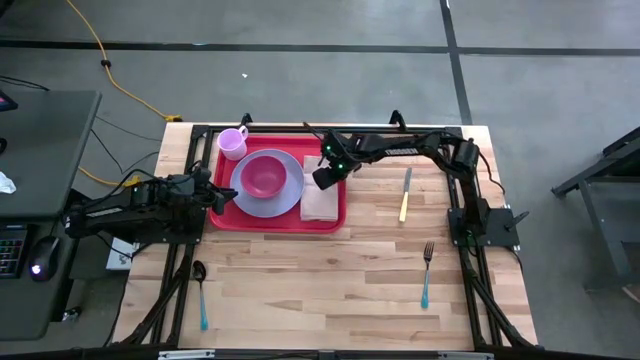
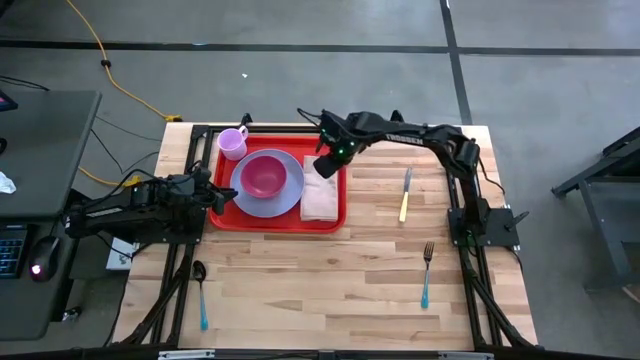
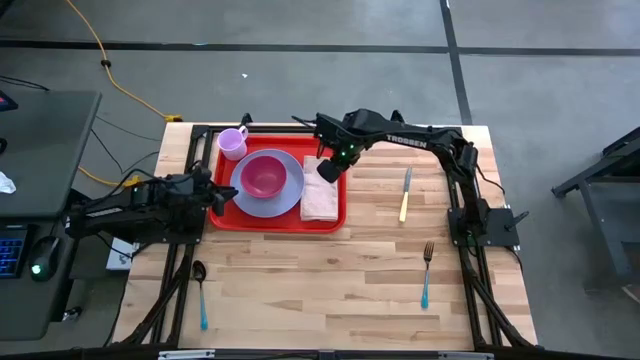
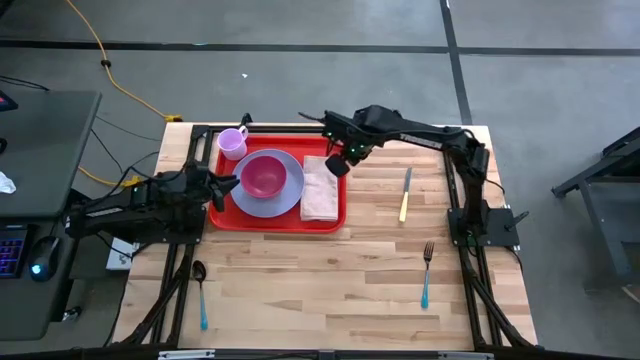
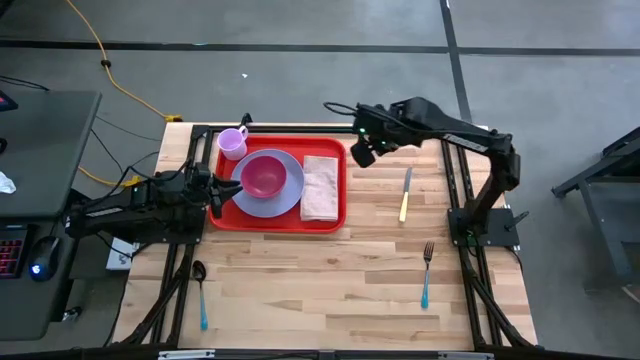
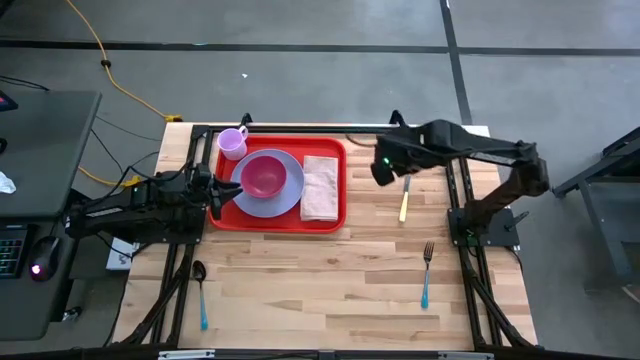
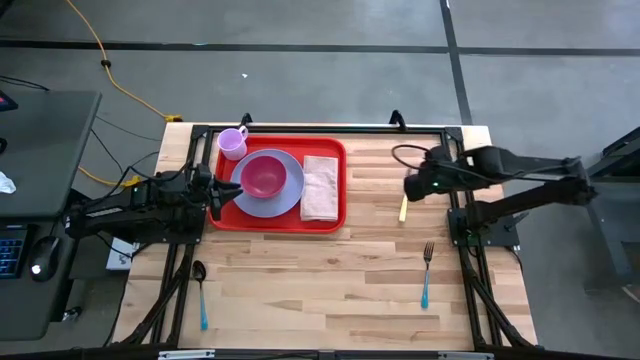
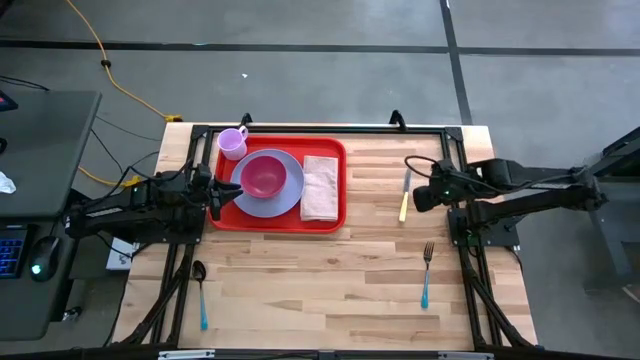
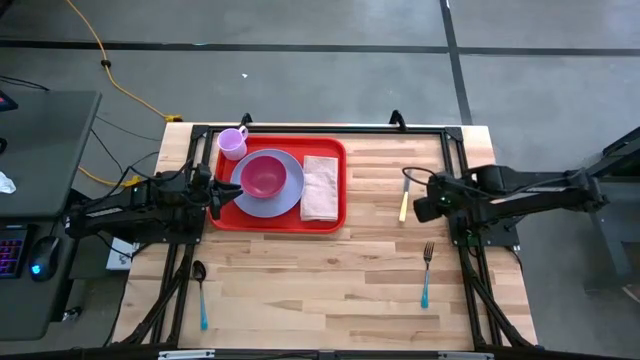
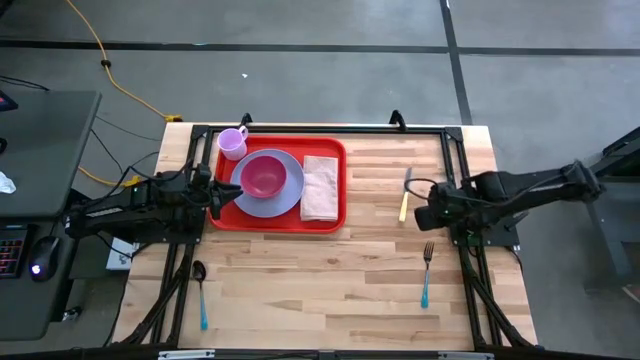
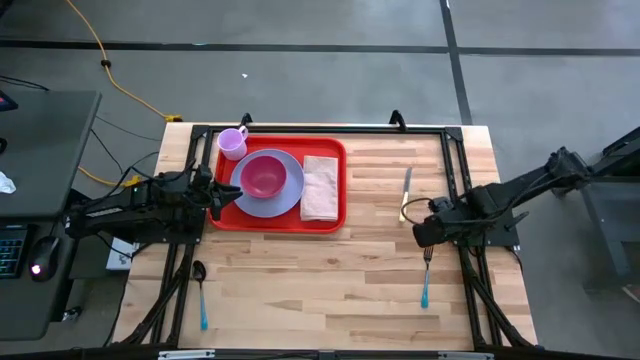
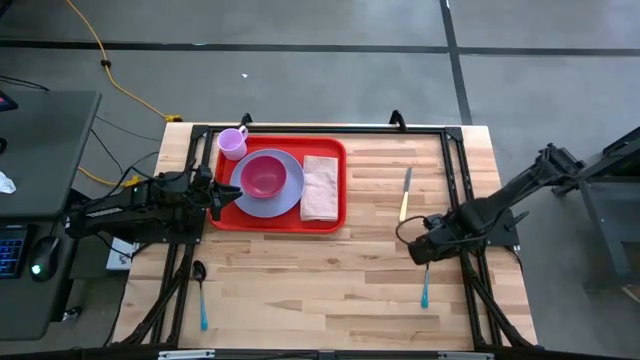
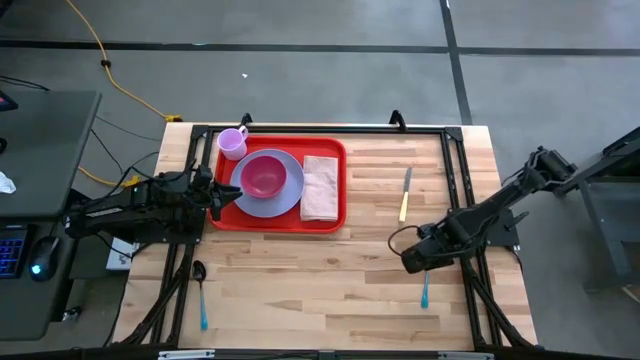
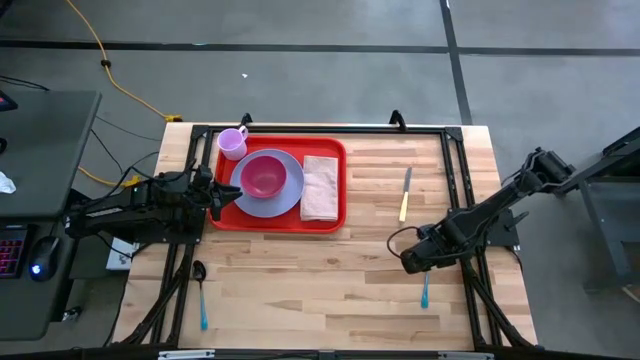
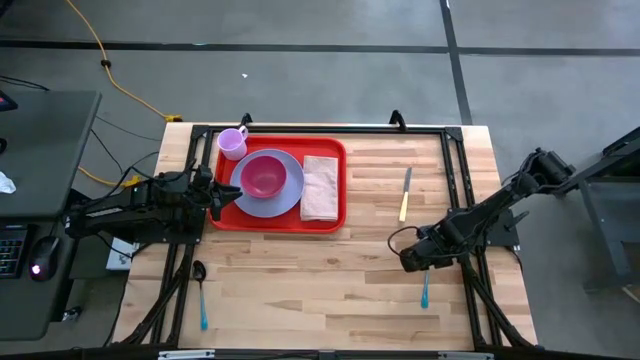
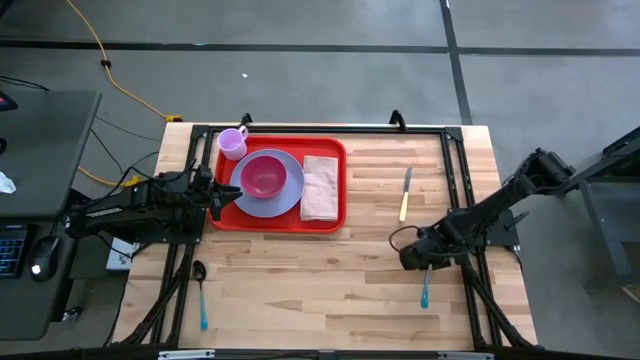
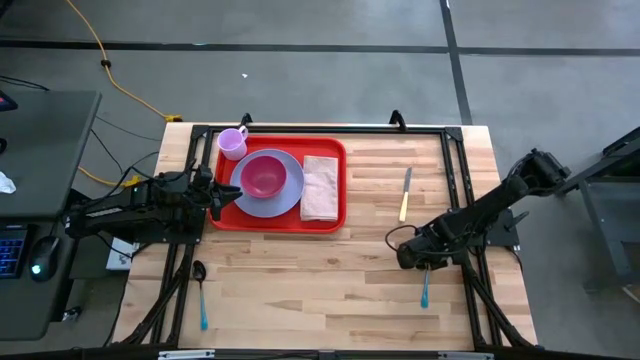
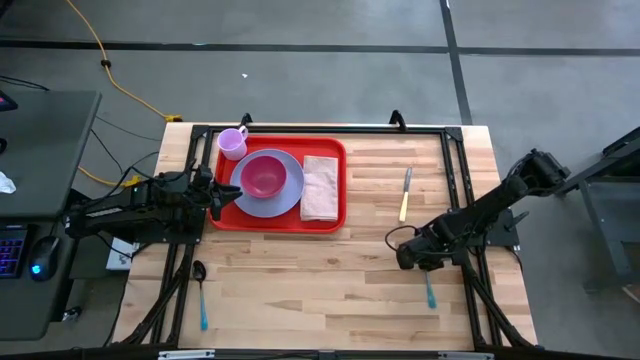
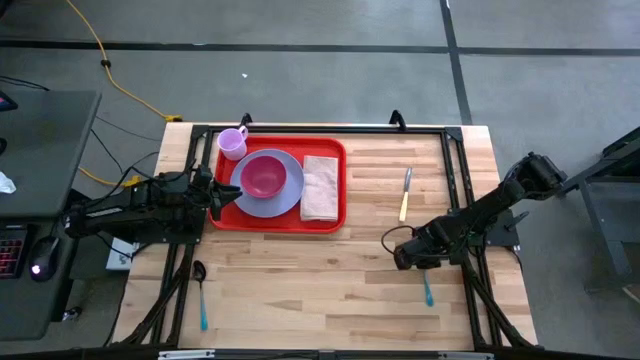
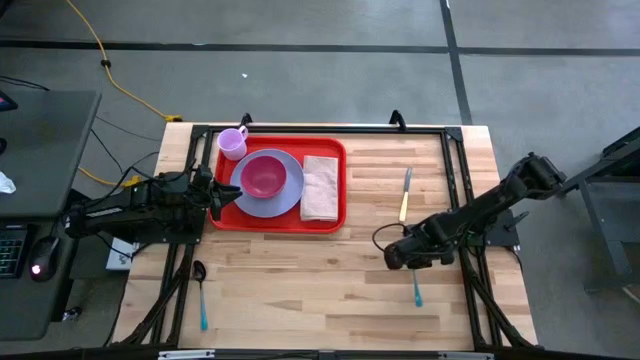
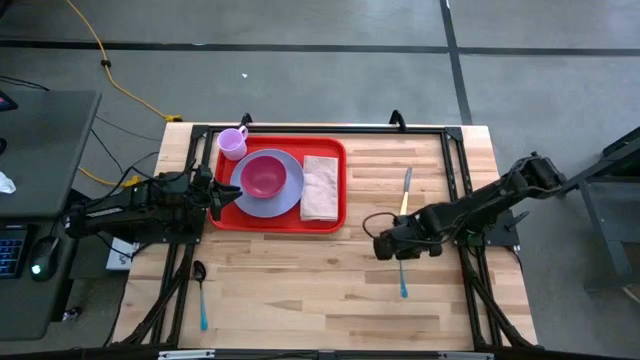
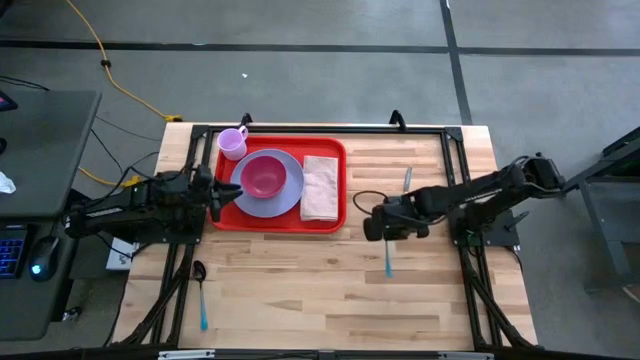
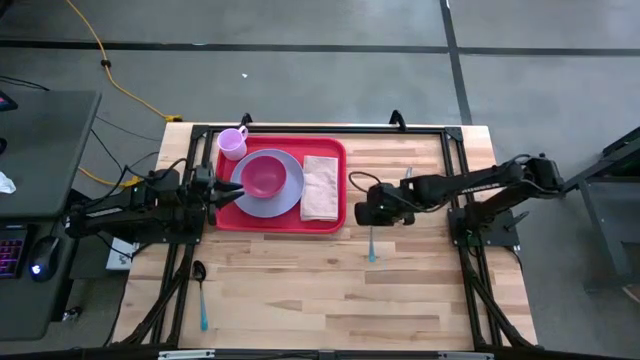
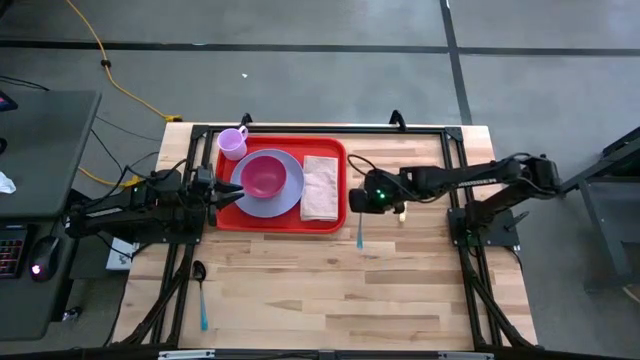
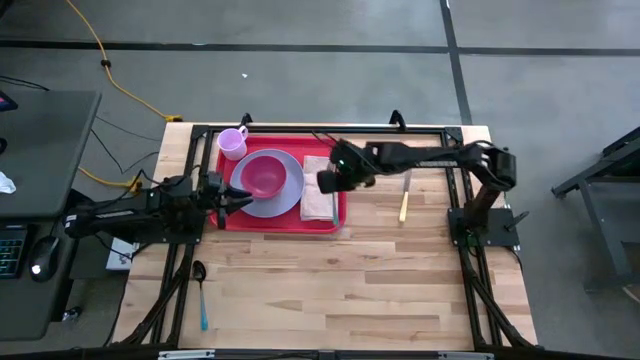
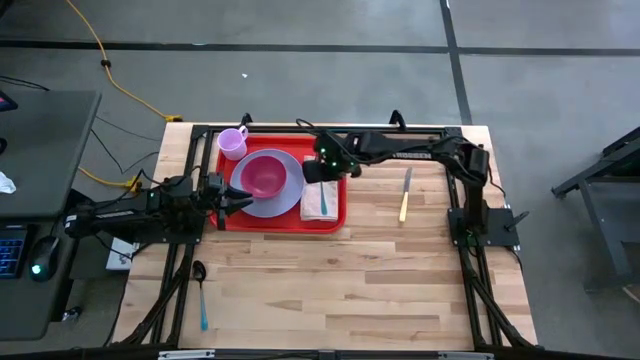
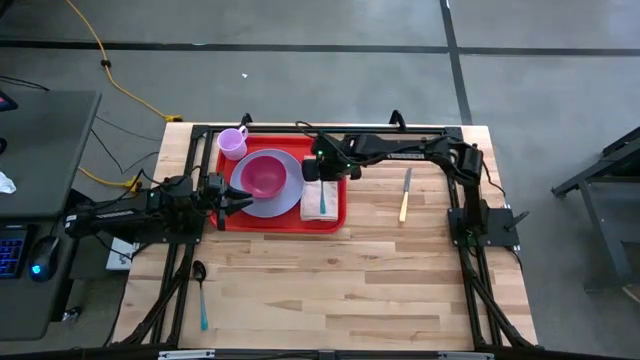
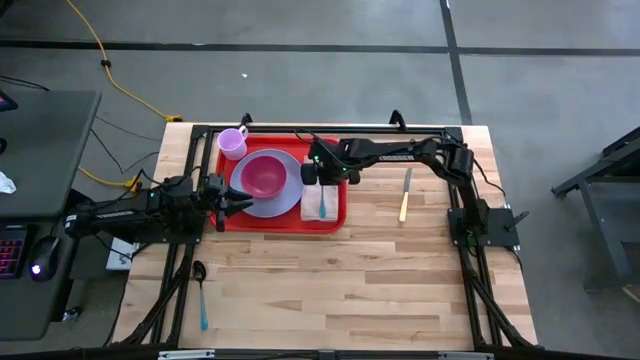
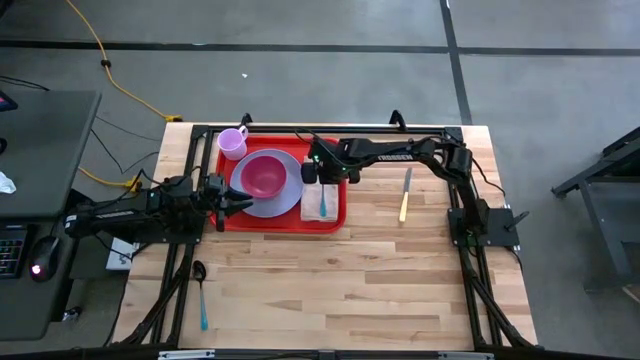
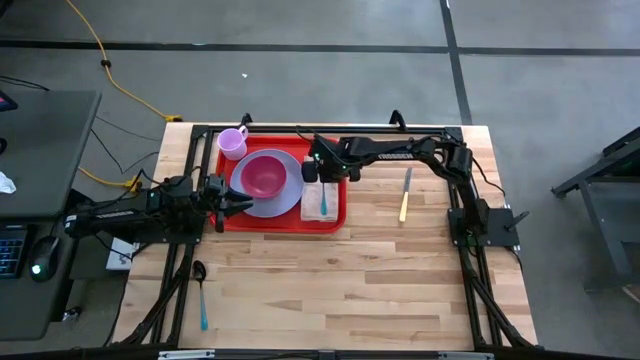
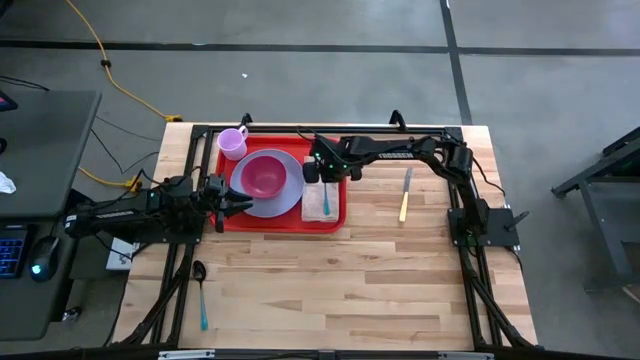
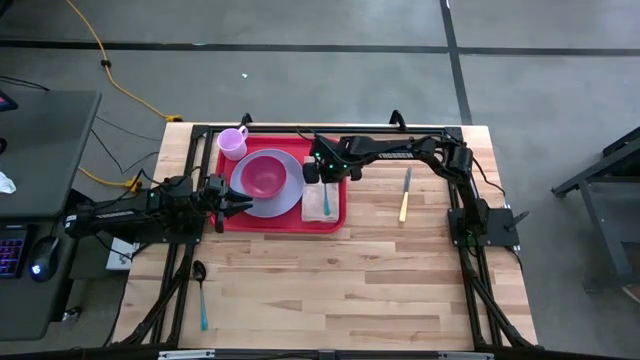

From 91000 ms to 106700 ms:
Task: Set up tray
Put the blue fork on the white table napkin on the red serving tray

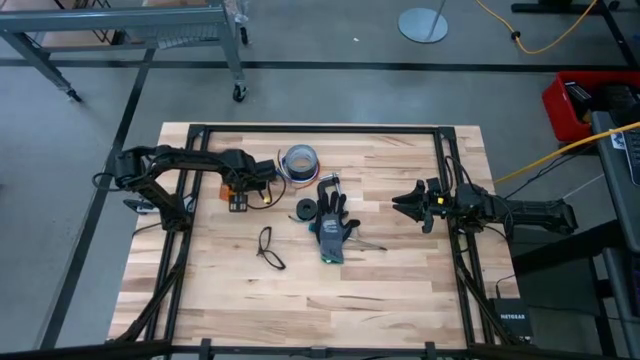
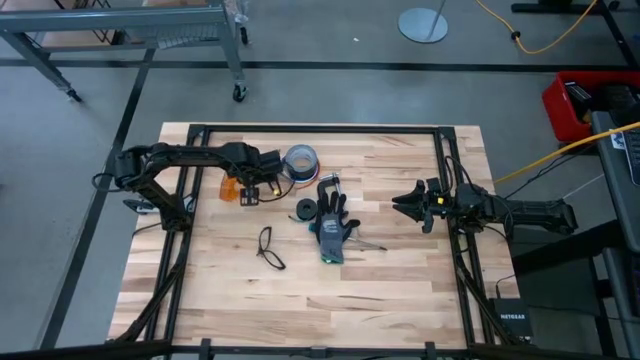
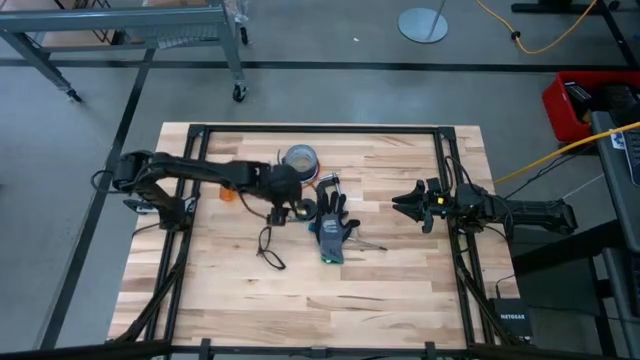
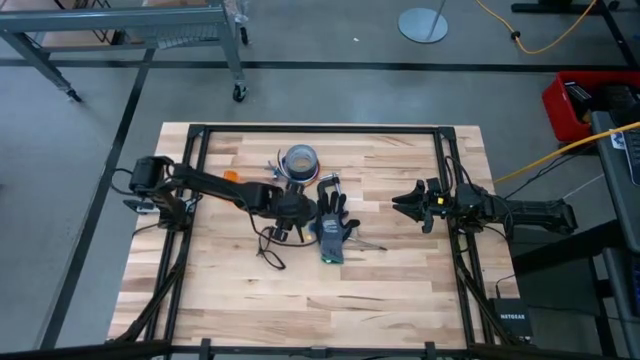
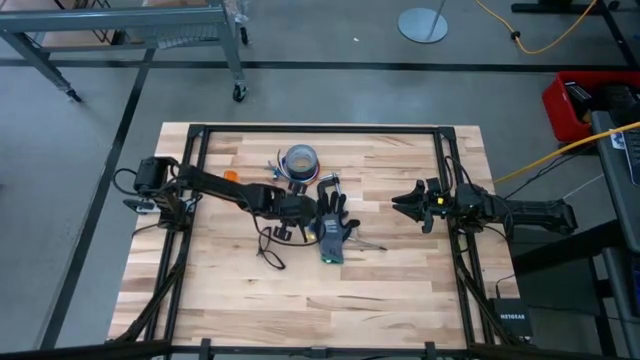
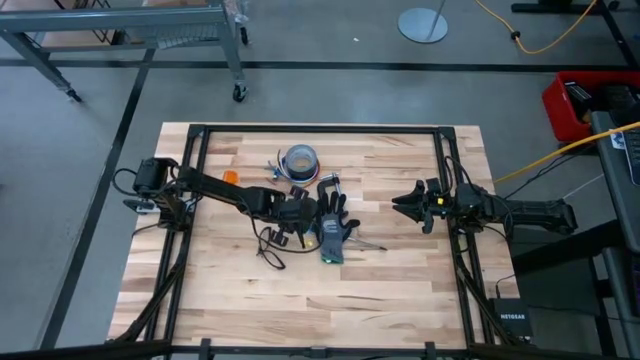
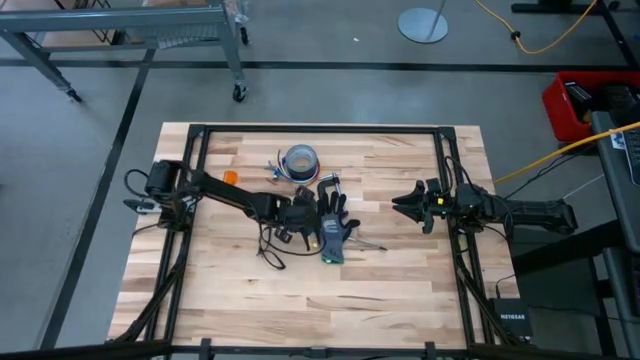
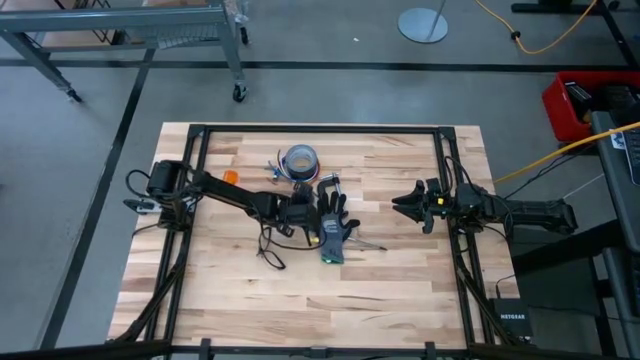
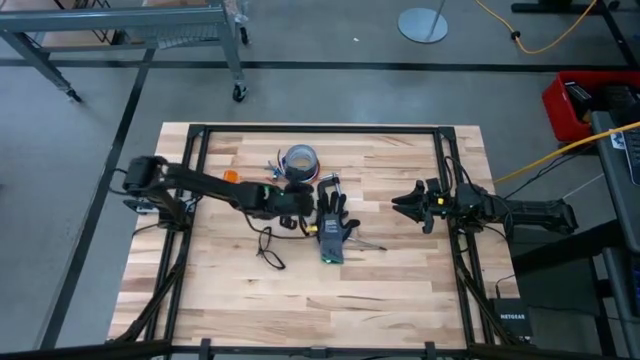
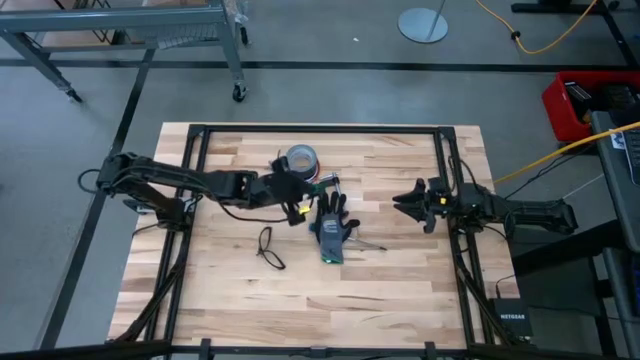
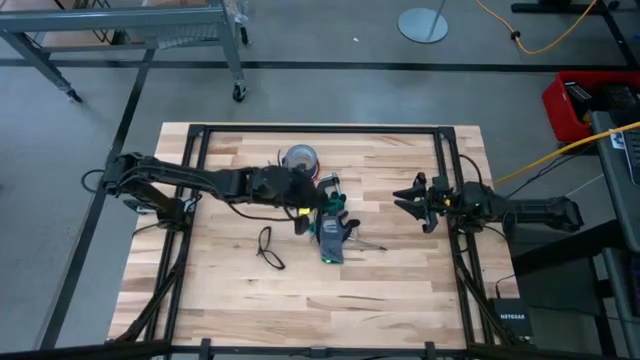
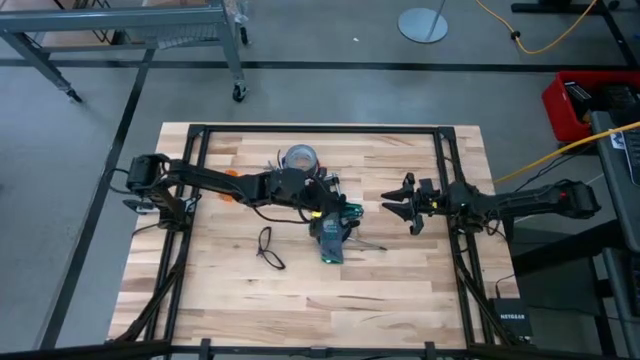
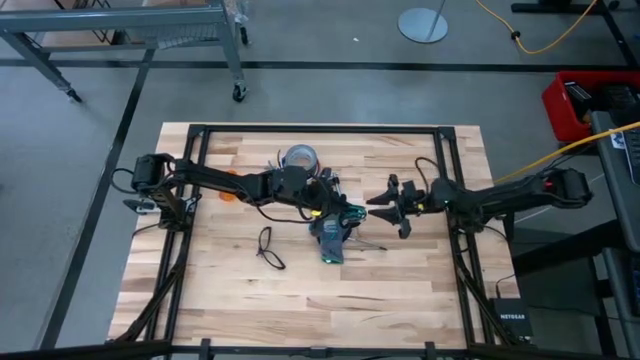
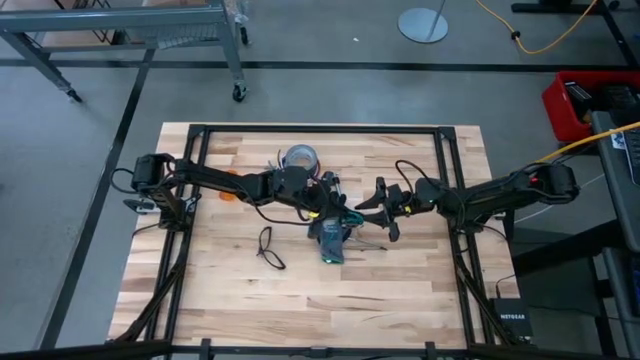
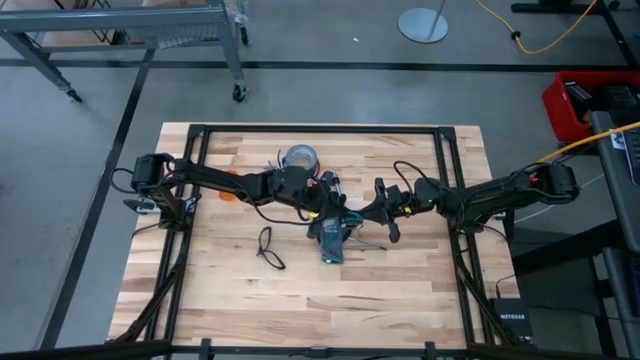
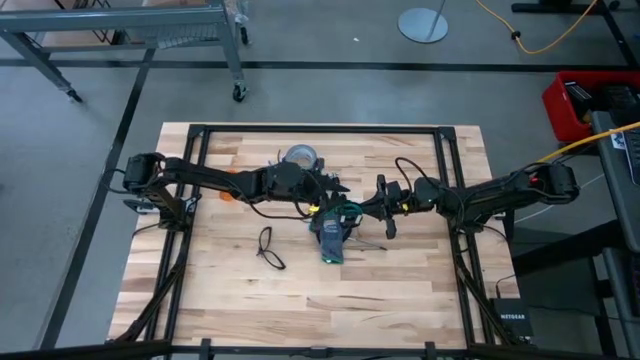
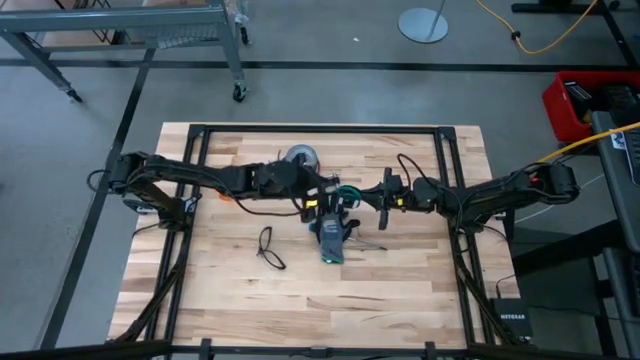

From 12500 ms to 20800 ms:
Task: Coil cords
Uncoil the green wire from the black spool
